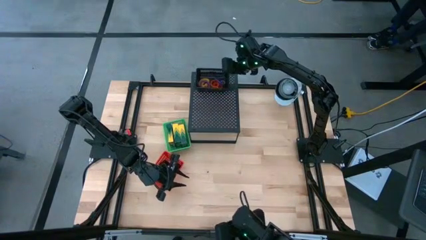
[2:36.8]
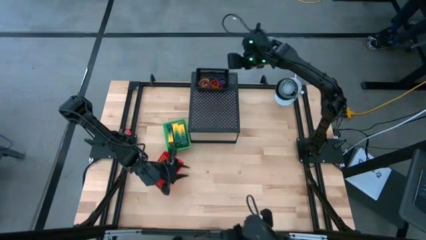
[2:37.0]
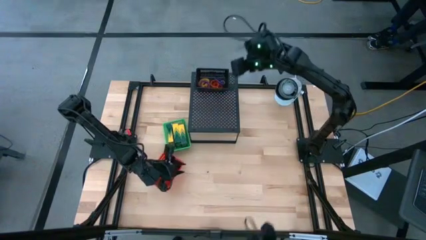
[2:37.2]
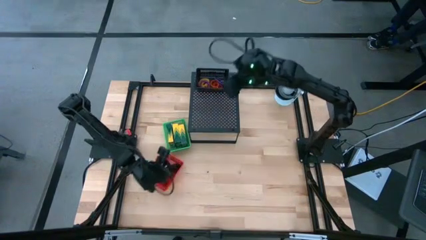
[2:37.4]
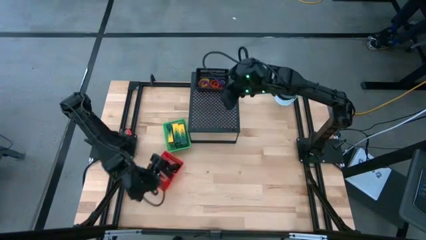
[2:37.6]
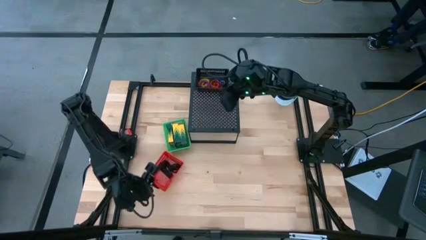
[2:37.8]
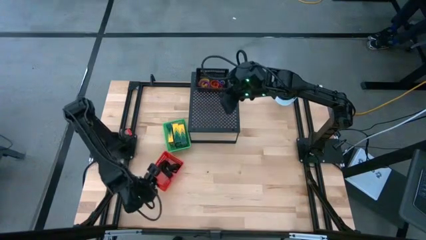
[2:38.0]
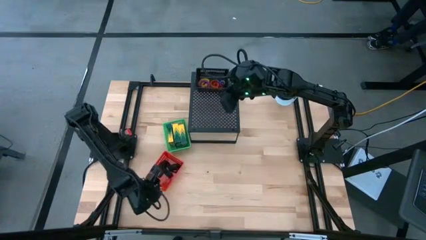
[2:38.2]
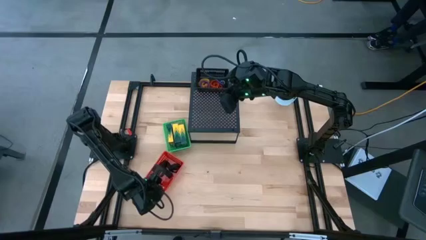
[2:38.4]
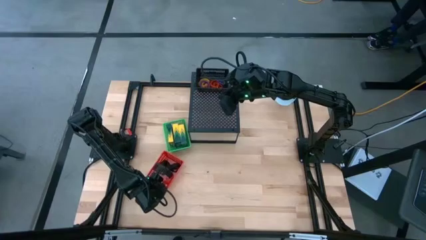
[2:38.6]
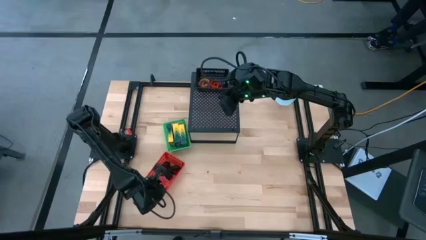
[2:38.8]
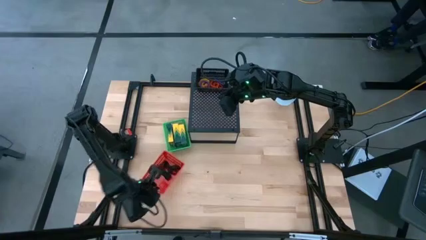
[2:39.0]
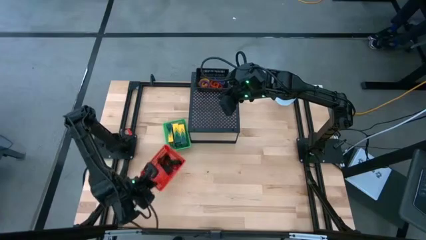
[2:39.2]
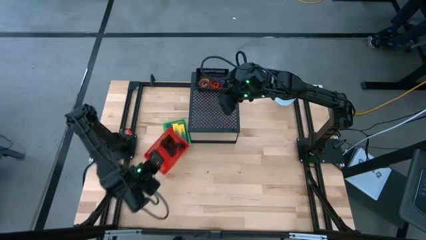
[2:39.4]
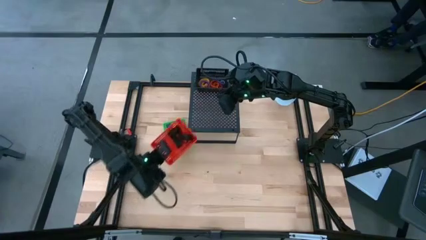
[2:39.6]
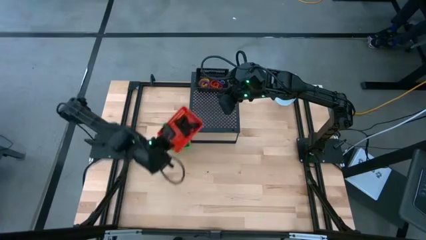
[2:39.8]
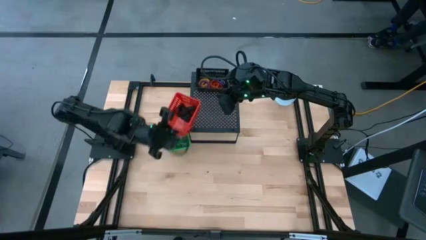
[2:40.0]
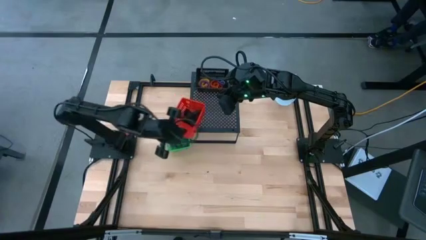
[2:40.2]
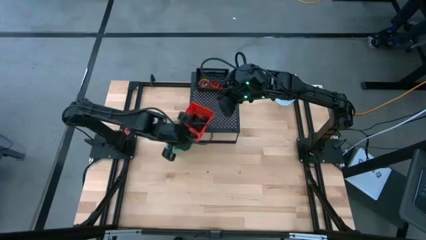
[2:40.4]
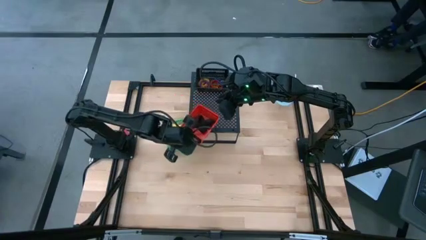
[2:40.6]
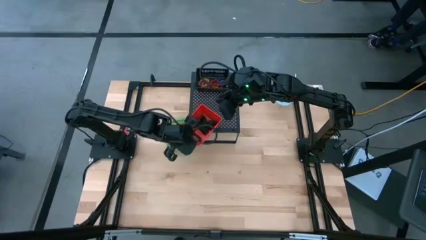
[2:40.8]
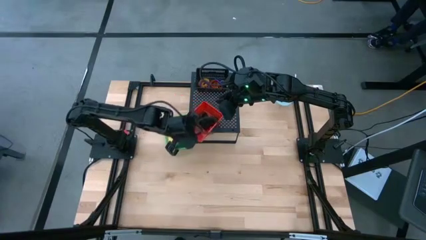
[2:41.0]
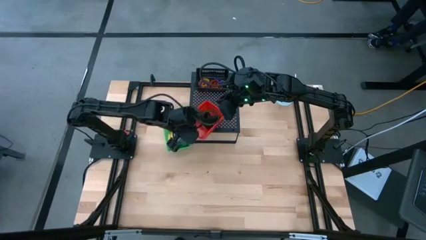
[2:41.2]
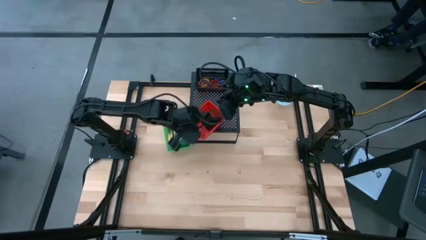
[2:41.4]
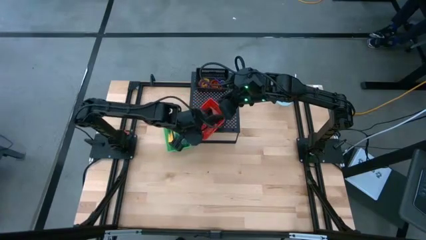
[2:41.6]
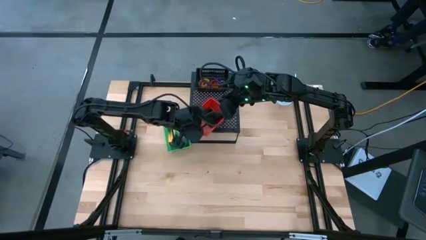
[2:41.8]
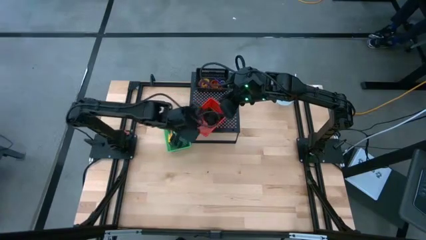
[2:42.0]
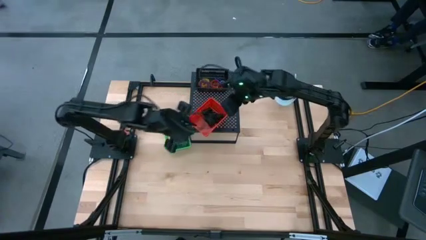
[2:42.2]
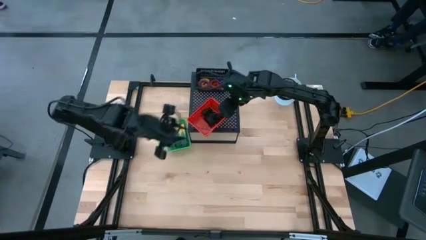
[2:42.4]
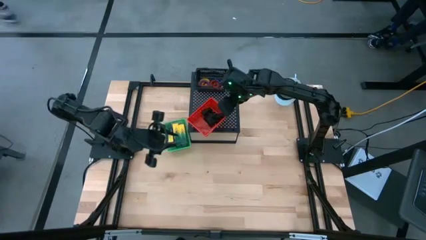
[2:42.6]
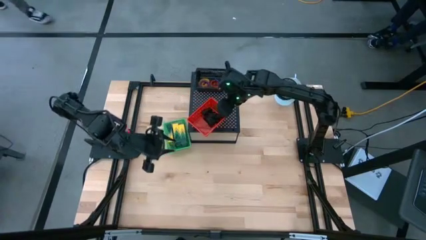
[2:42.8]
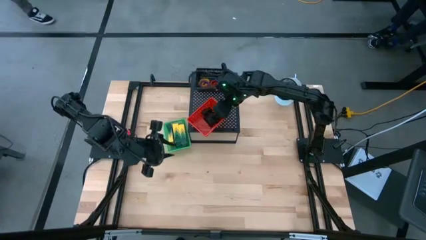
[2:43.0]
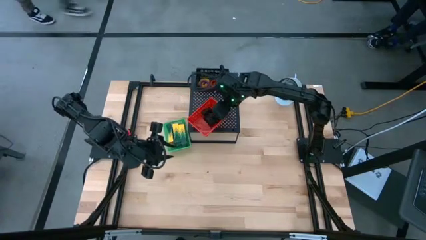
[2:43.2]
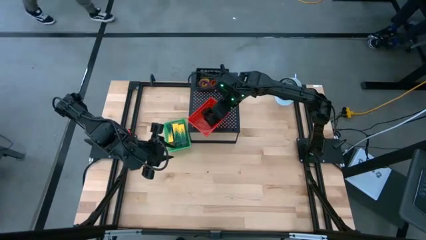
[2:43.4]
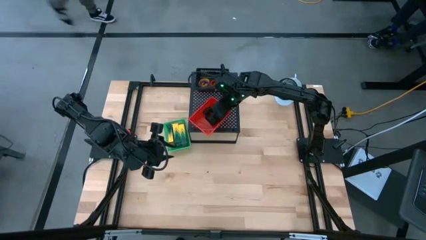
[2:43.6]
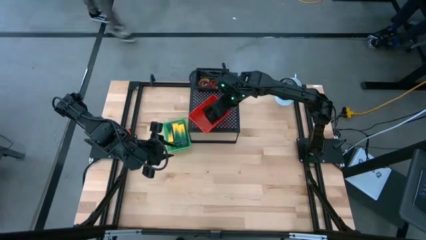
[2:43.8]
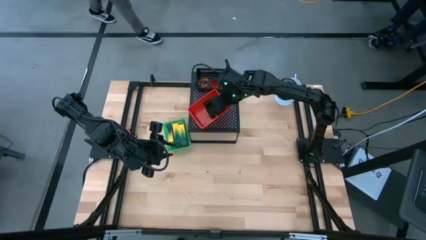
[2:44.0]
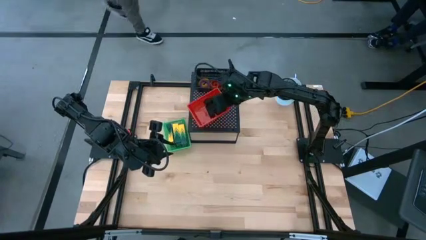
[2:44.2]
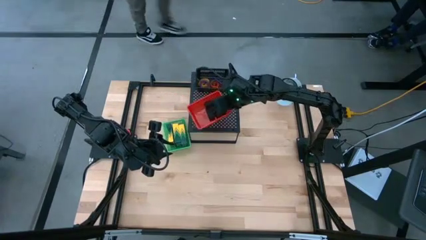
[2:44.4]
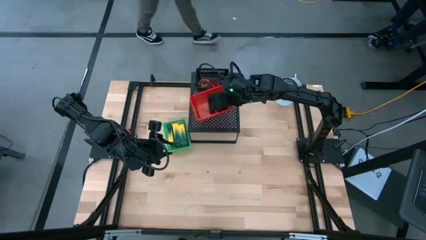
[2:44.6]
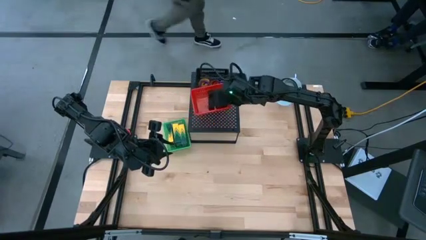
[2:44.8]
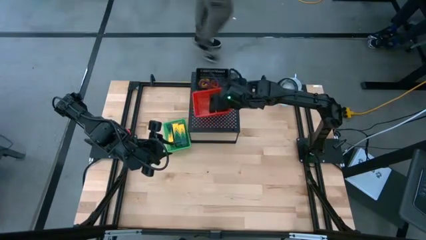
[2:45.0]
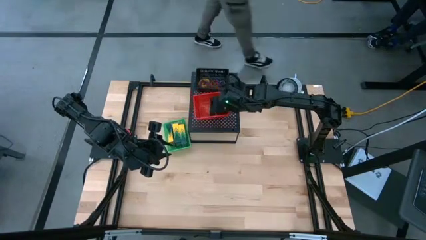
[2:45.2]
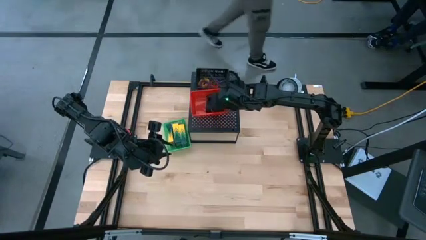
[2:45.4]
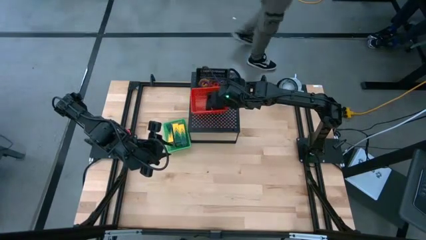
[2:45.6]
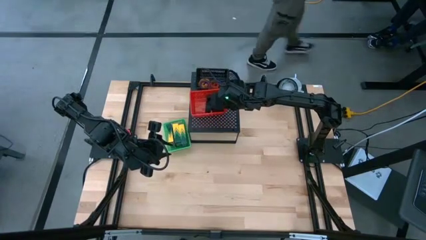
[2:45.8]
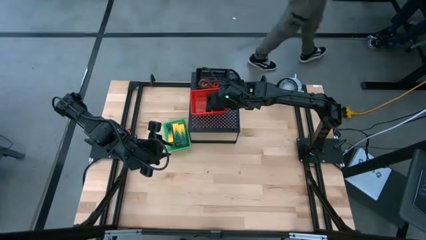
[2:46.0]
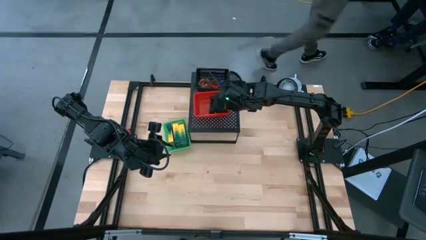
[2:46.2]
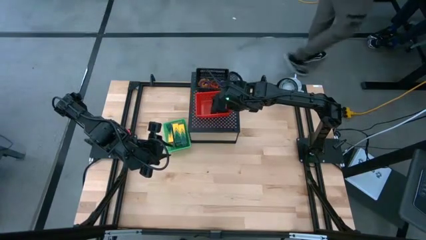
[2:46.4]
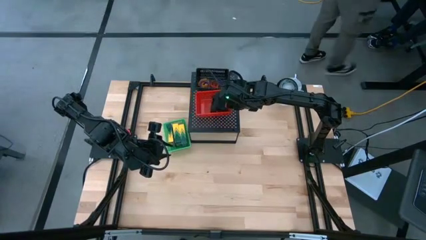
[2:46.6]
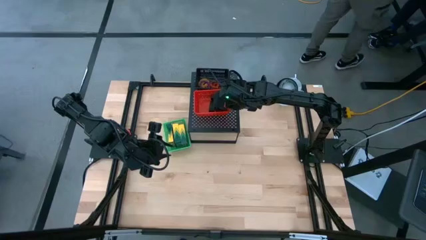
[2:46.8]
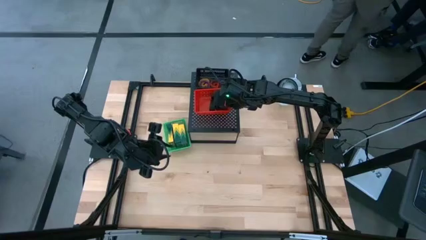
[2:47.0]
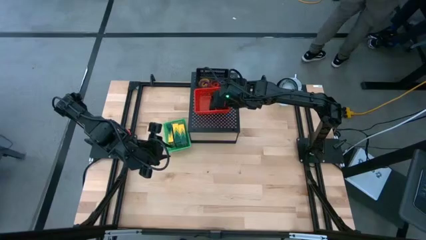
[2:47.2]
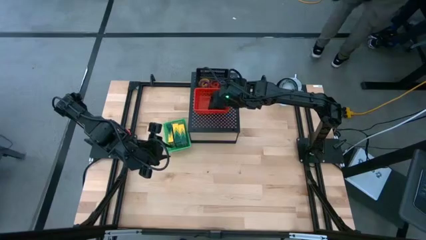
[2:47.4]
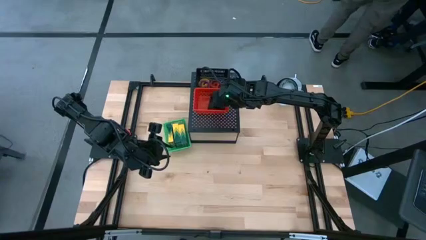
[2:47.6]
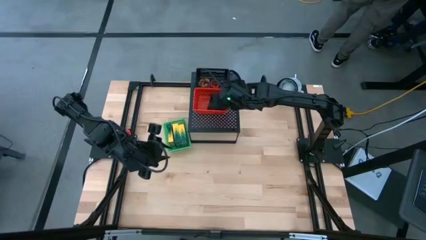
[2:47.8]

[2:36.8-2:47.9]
Task: Pick & Place Office Desk Supplies
Put the red bin on the shelf

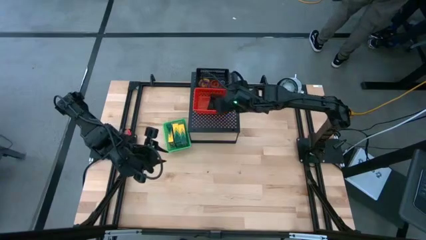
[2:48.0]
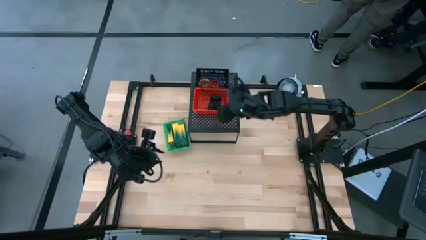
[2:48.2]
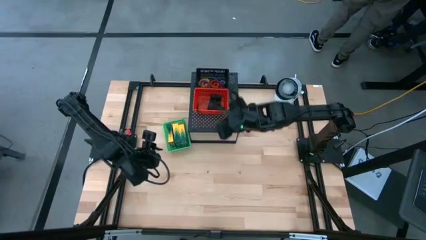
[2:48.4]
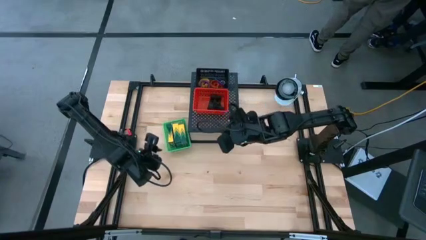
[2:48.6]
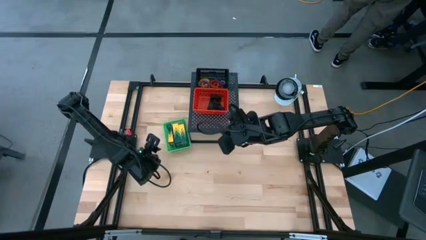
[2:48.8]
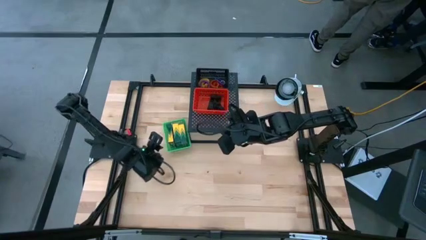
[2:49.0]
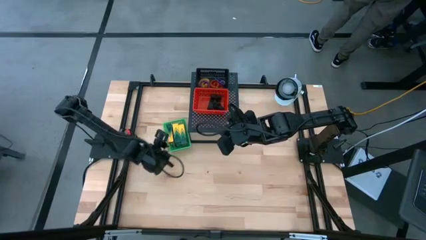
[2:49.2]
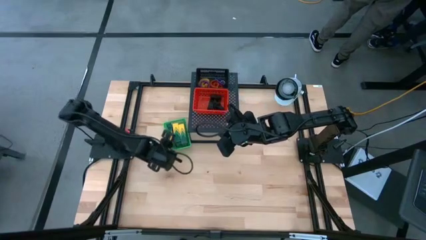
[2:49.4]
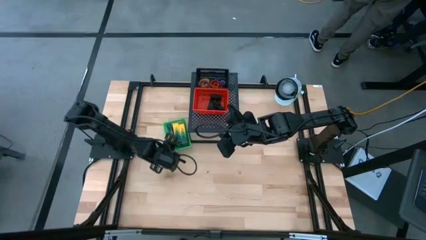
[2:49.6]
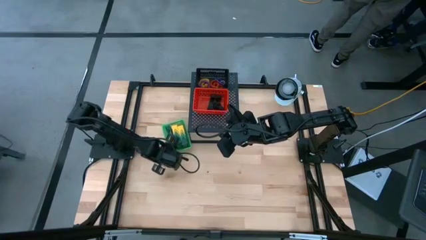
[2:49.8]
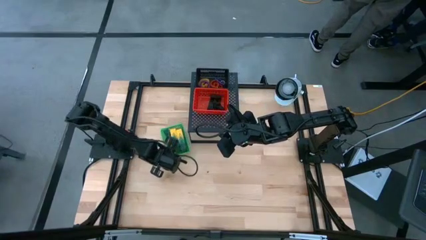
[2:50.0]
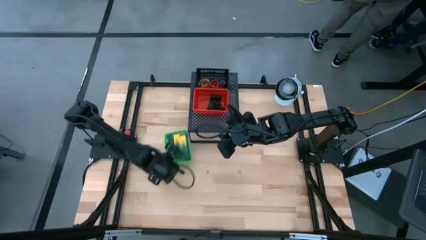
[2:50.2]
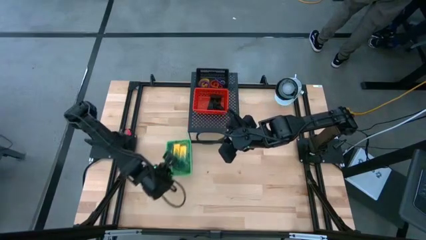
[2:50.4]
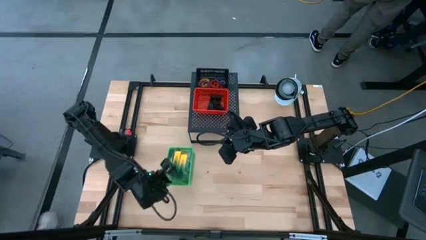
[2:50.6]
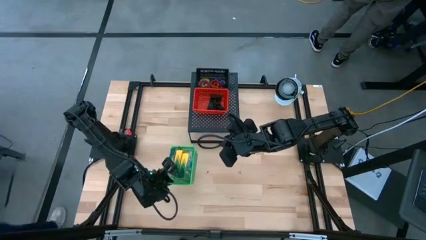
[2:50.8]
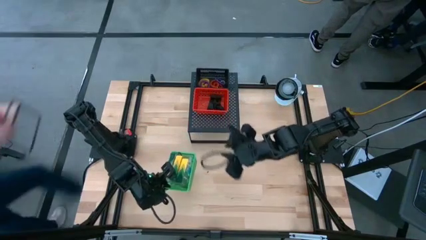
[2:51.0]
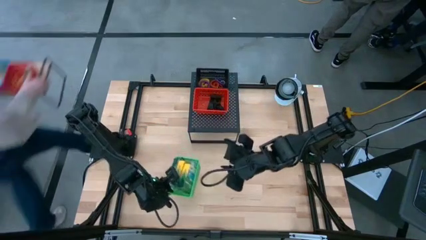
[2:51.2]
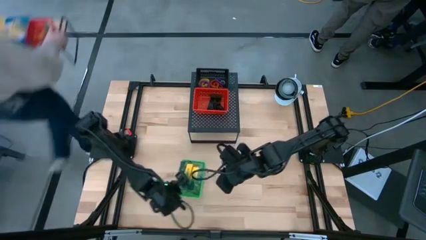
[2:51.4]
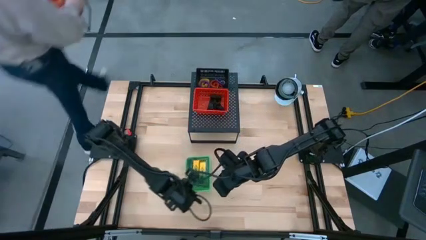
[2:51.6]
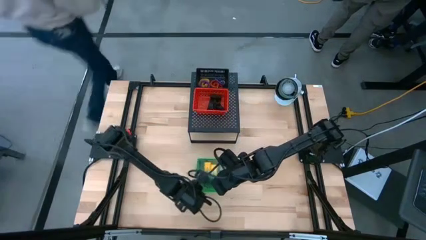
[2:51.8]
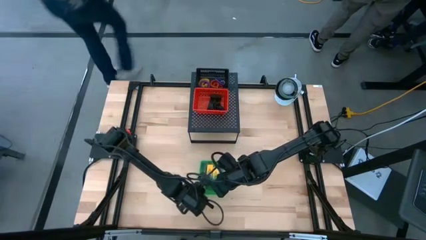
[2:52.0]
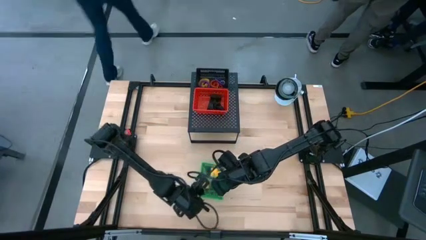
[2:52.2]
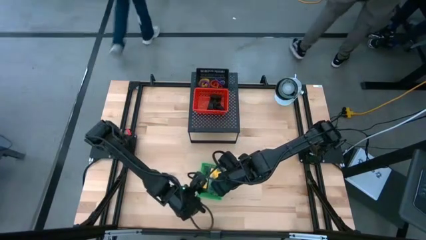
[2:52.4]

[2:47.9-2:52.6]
Move the green bin to the center of the table
